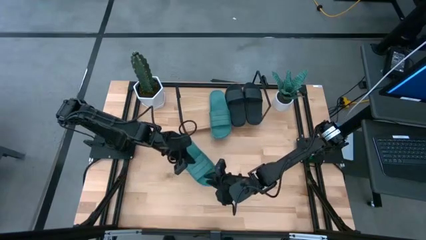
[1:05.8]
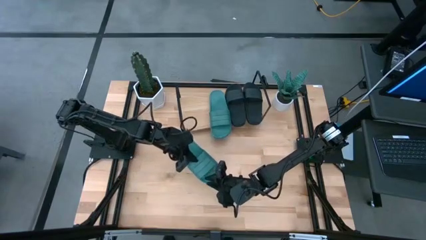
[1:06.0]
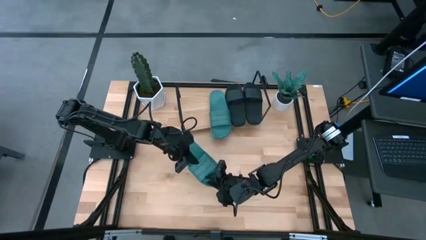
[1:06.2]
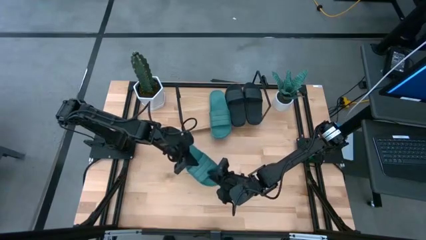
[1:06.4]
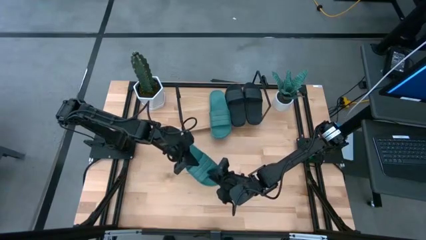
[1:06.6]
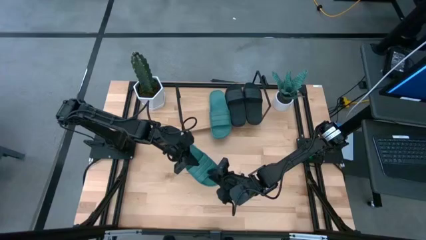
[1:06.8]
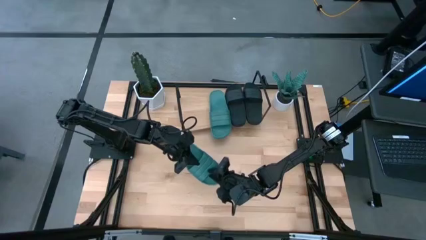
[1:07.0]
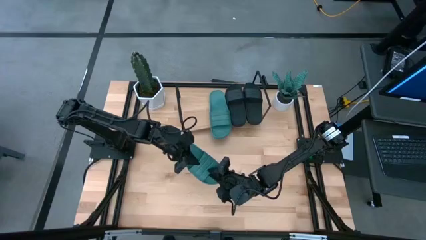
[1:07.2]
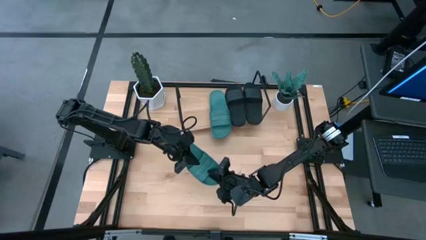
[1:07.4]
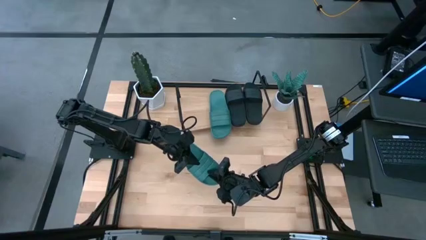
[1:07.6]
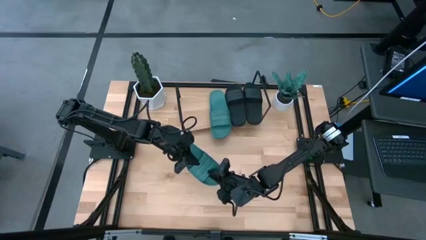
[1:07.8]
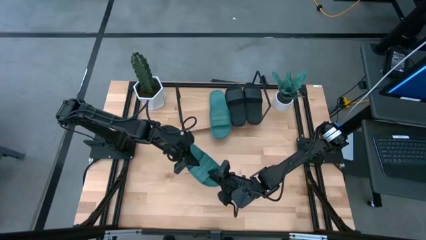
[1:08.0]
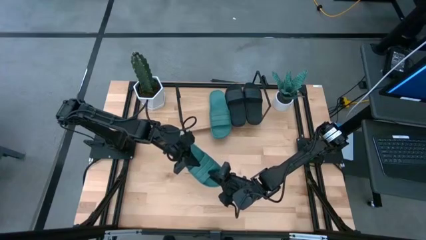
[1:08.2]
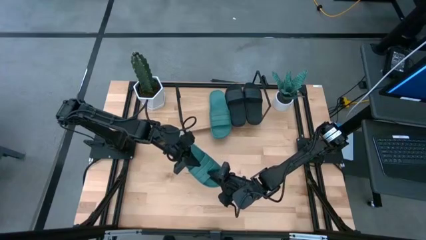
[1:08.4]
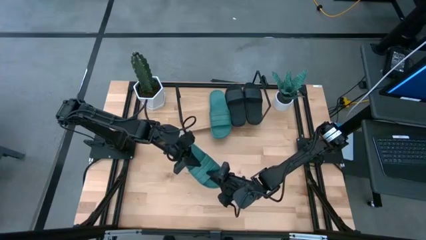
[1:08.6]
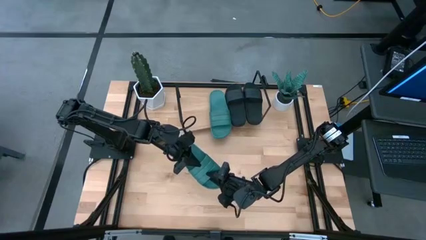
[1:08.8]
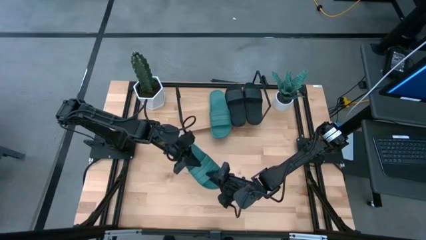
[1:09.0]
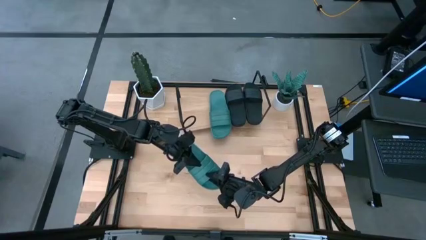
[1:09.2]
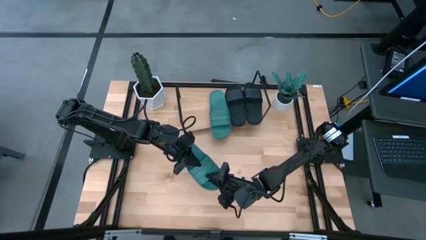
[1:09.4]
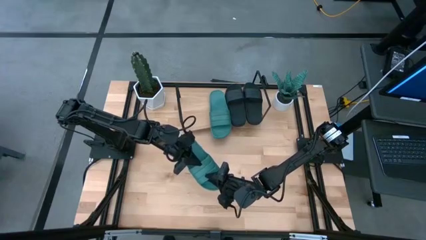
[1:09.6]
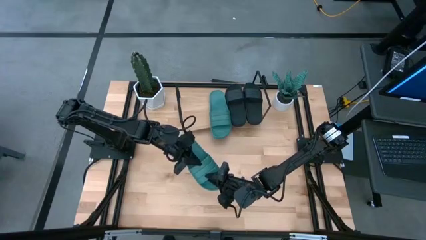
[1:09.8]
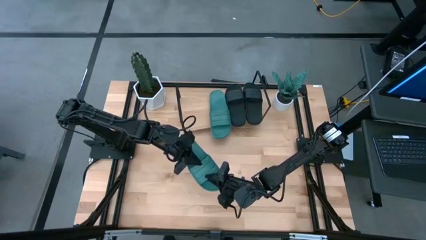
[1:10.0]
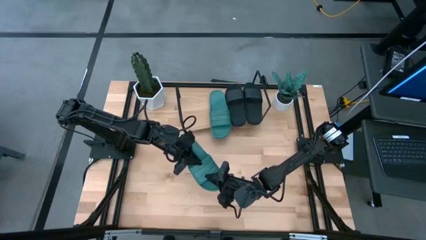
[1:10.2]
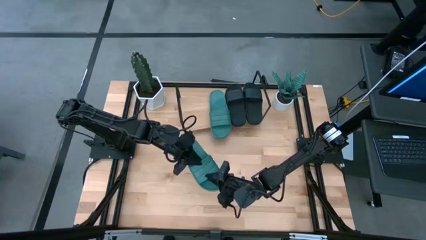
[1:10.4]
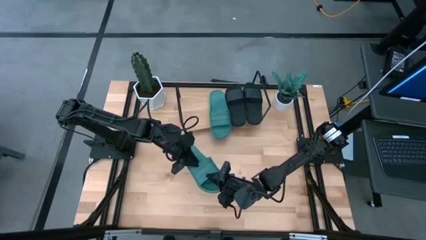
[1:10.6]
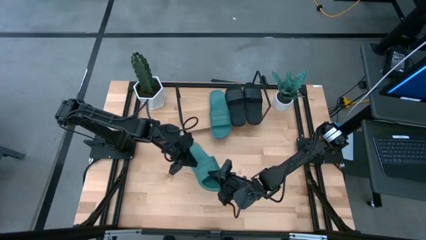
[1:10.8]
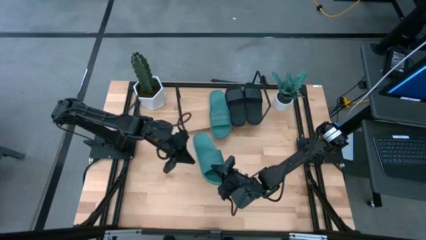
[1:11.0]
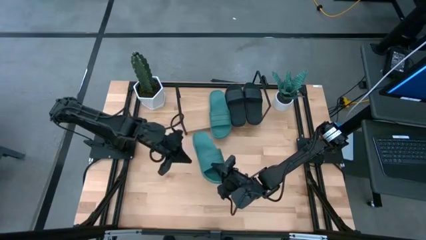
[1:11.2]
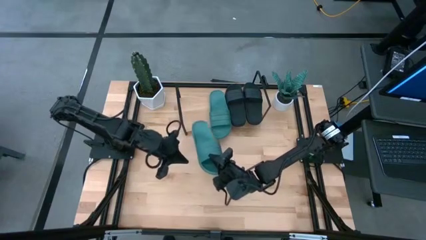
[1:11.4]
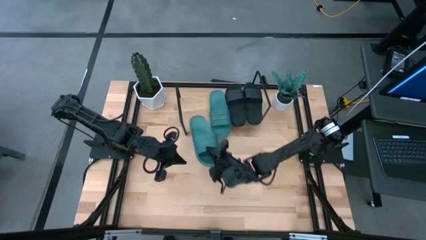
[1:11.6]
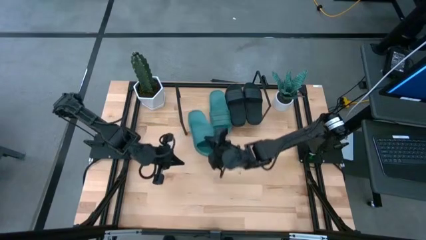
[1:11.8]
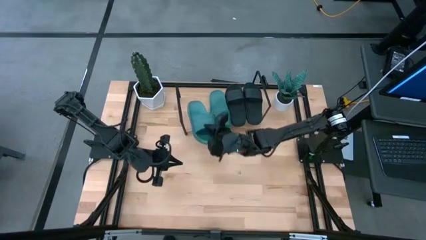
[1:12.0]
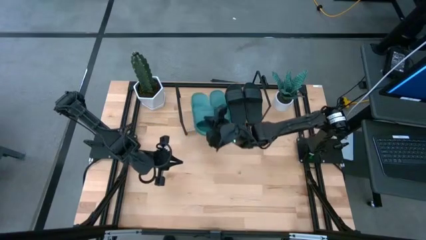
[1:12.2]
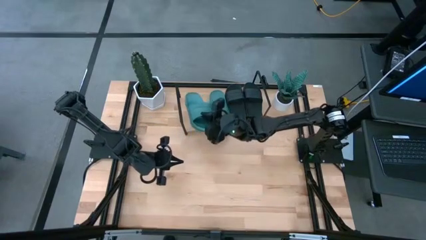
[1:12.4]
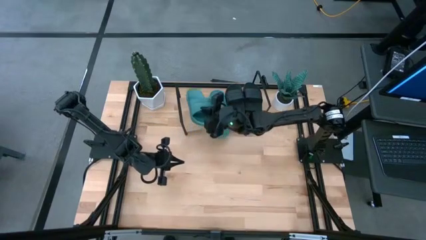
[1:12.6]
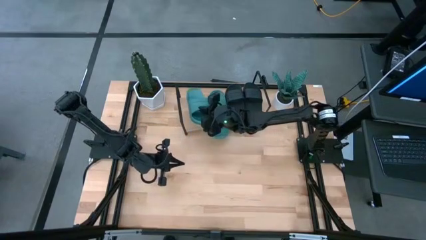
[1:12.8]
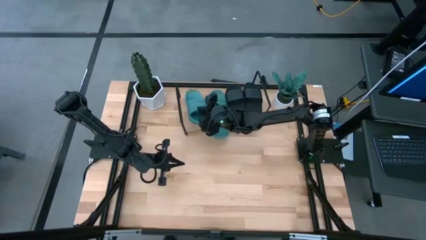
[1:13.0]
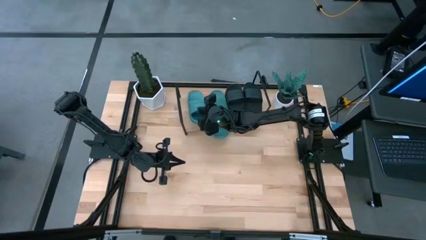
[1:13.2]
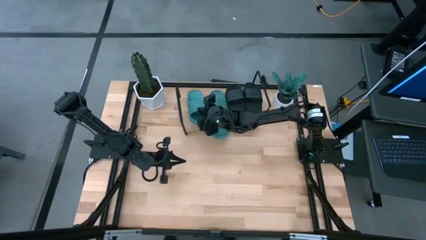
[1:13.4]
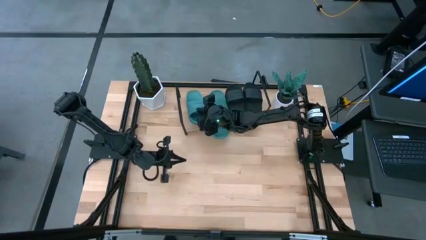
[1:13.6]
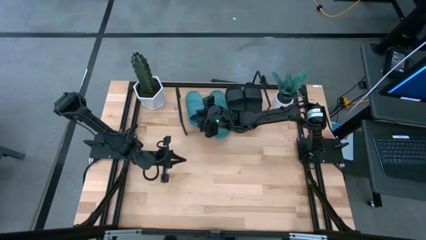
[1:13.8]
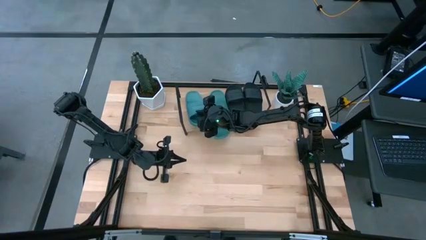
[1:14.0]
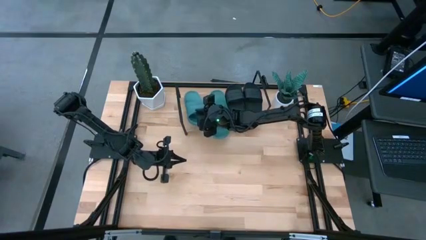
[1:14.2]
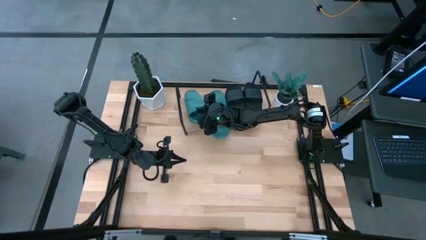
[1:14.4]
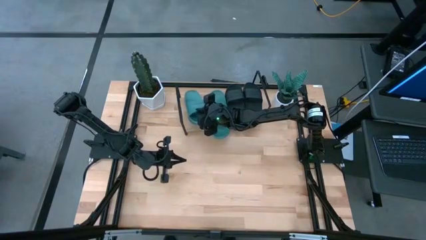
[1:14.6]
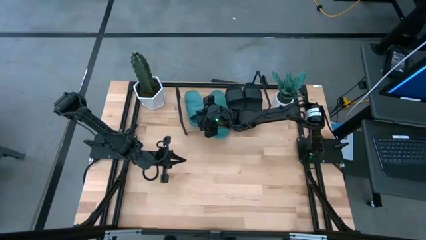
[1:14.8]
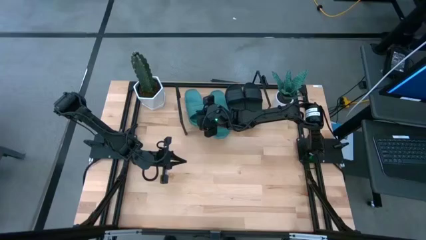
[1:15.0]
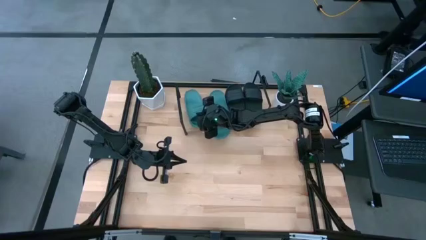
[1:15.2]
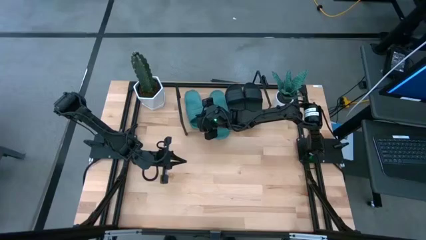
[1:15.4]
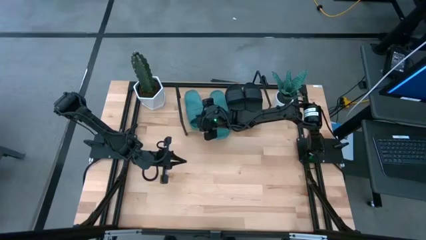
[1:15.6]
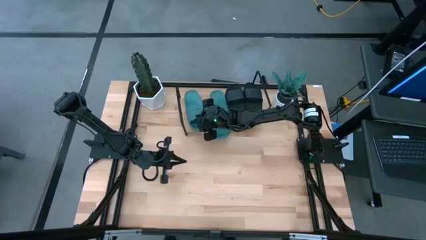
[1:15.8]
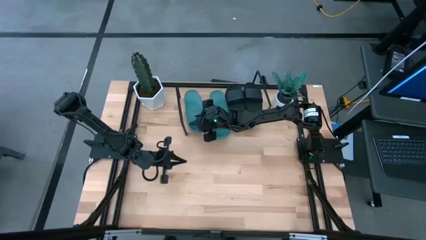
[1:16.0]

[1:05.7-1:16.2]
Task: Pick and place slides into the shelf
Put the dark green slide on the shelf
